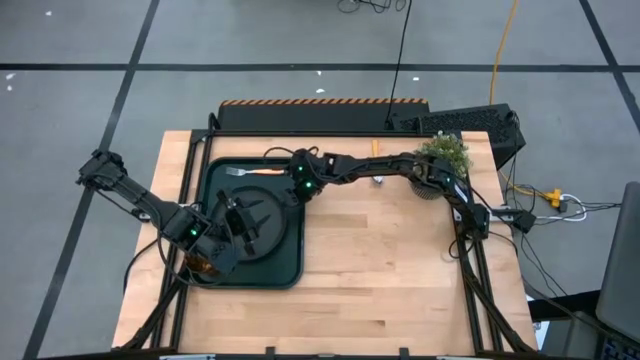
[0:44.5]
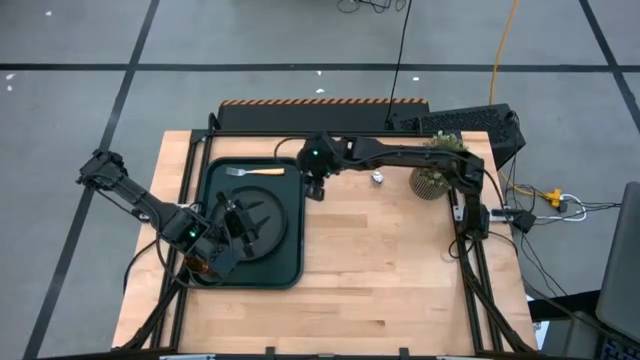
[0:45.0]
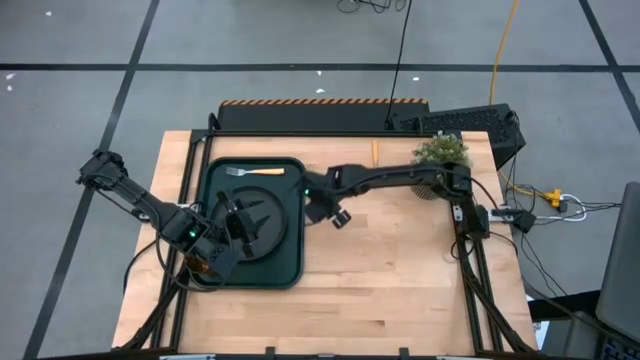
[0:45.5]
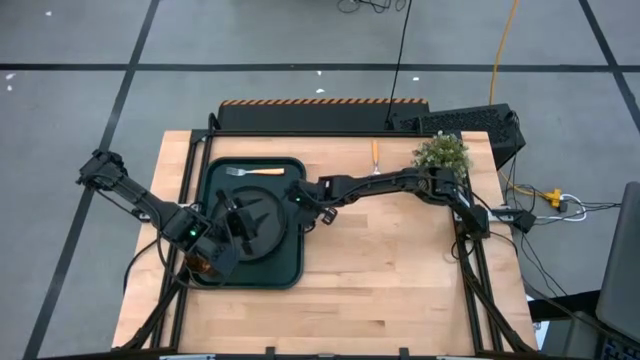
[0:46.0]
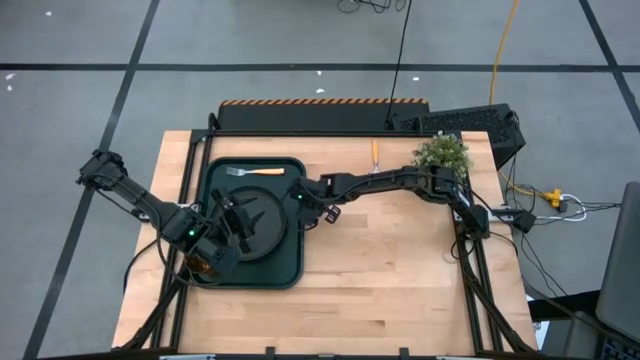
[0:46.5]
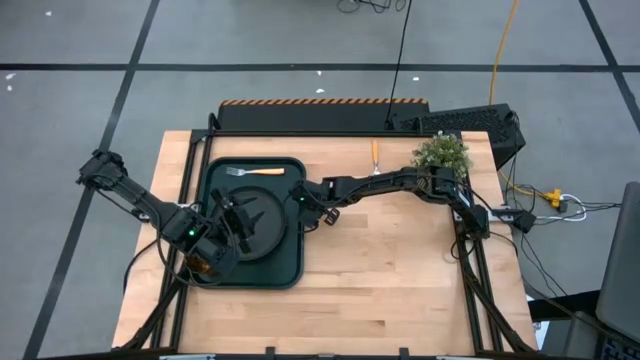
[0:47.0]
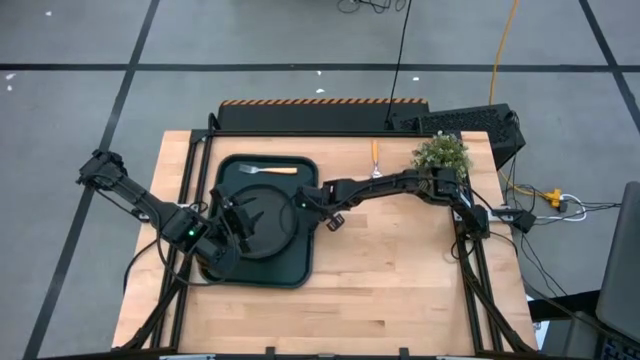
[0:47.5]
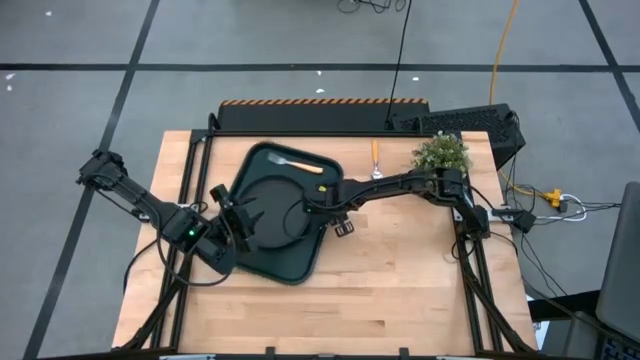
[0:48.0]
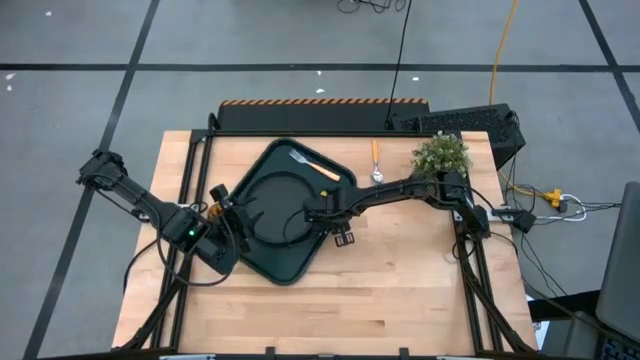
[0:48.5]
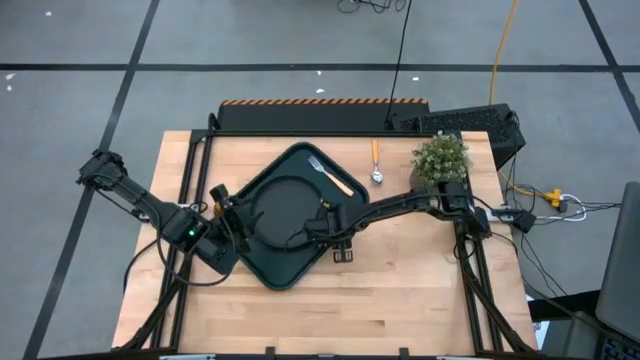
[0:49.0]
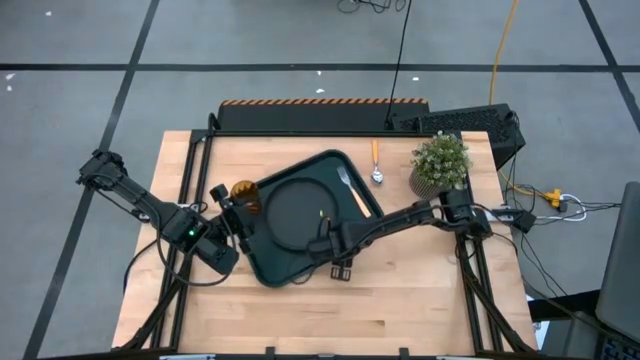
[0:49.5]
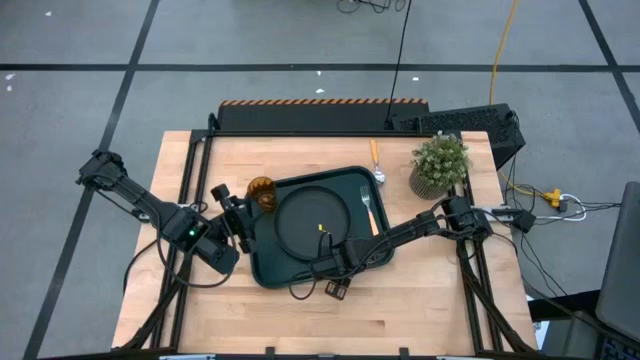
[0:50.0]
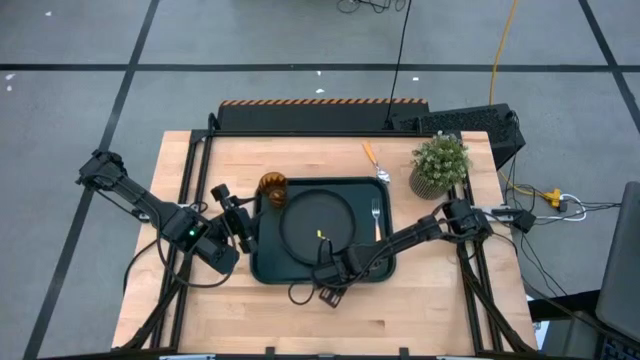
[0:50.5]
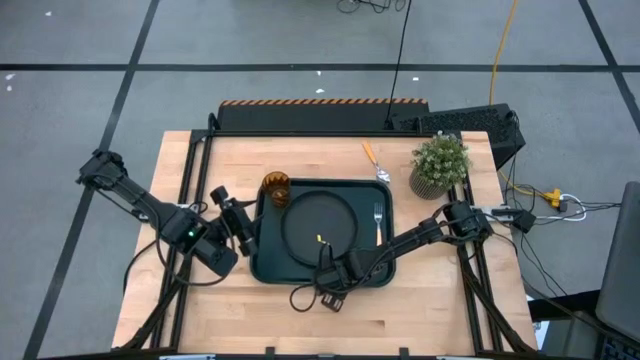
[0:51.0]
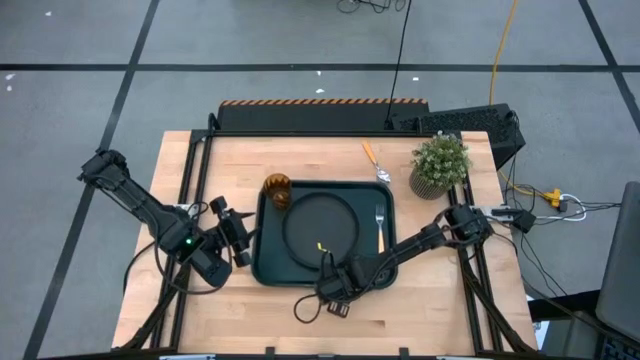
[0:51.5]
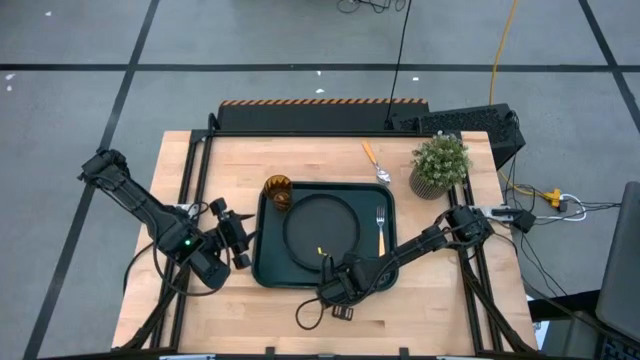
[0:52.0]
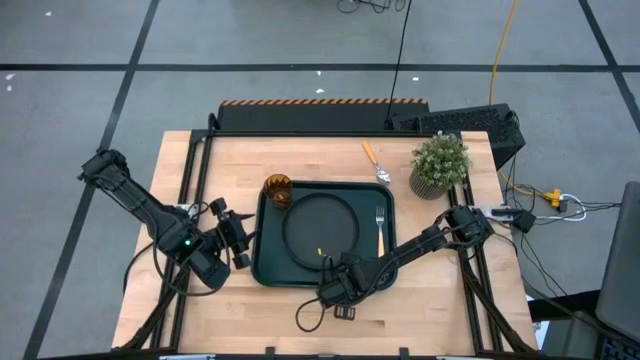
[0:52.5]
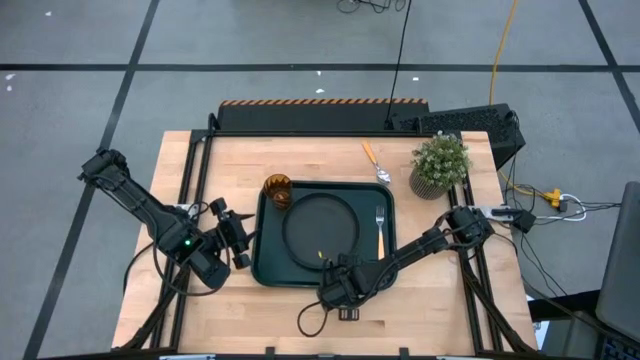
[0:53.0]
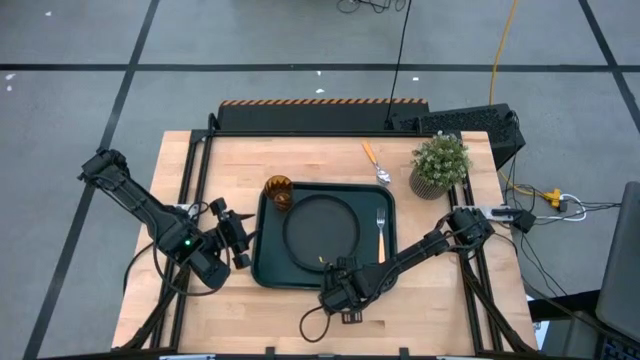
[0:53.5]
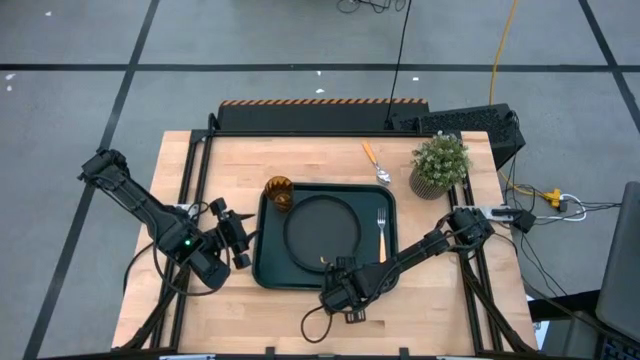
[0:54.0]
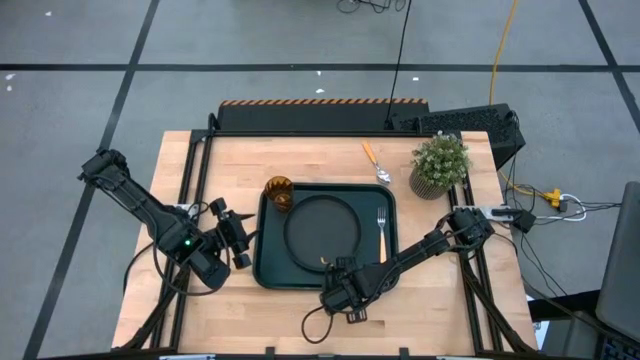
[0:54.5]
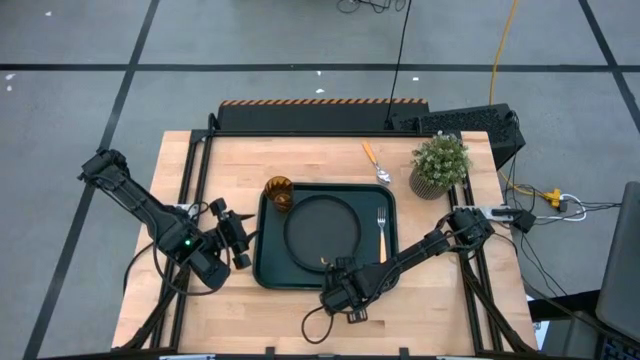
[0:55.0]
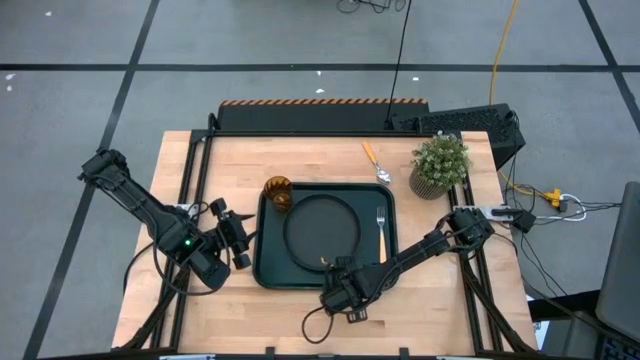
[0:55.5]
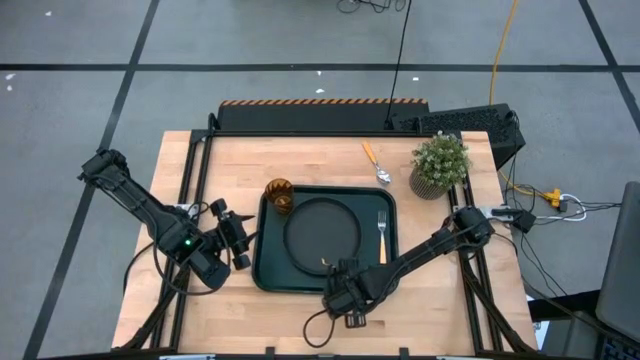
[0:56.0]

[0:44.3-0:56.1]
Task: Pick and place plate/cup/fork/spoon on tray
Move the black tray to the center of the table

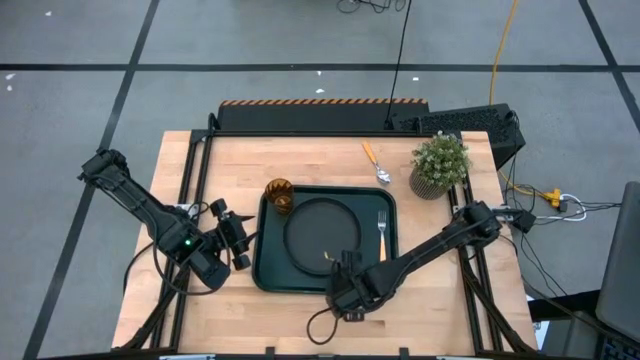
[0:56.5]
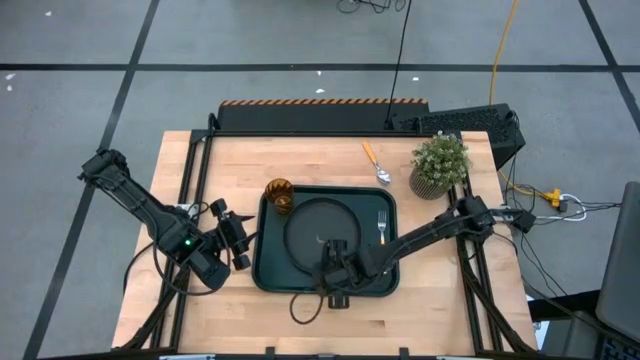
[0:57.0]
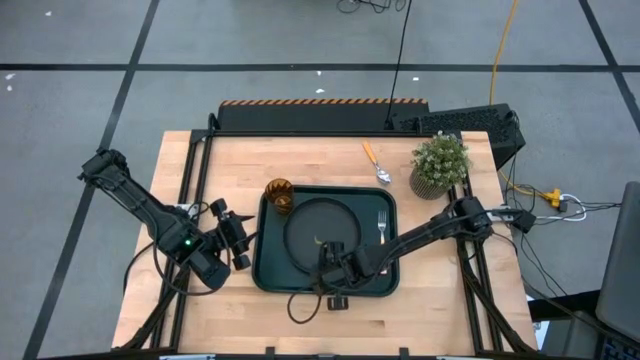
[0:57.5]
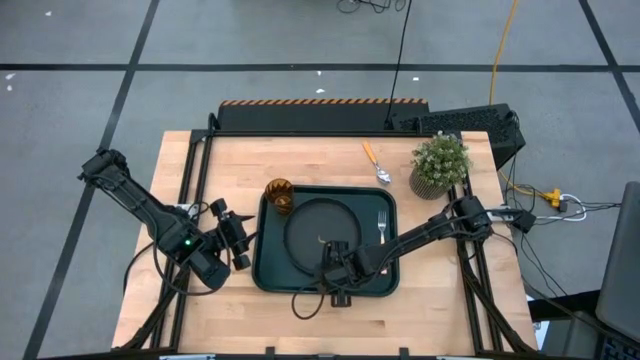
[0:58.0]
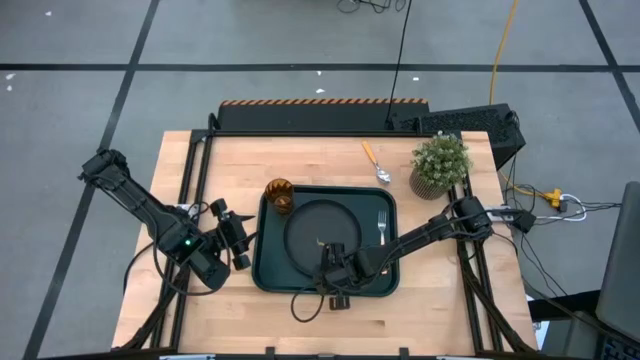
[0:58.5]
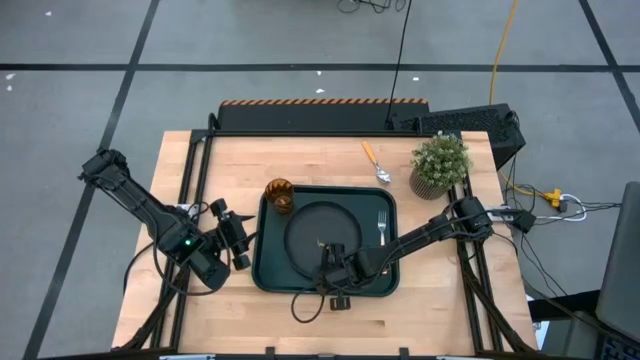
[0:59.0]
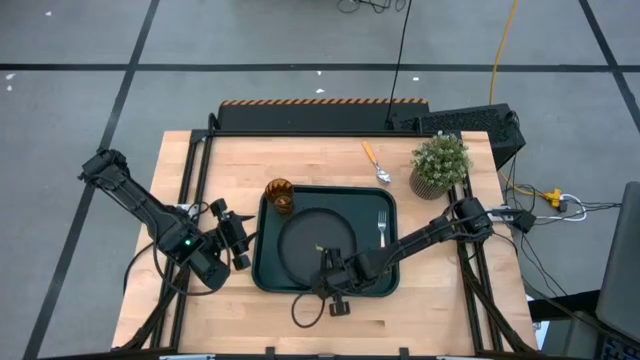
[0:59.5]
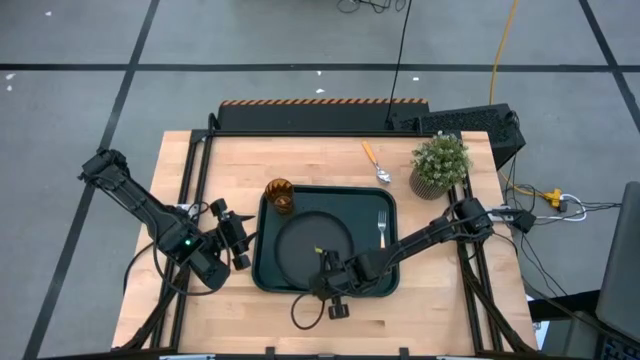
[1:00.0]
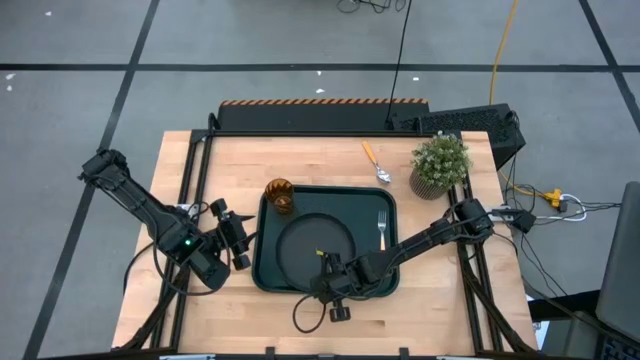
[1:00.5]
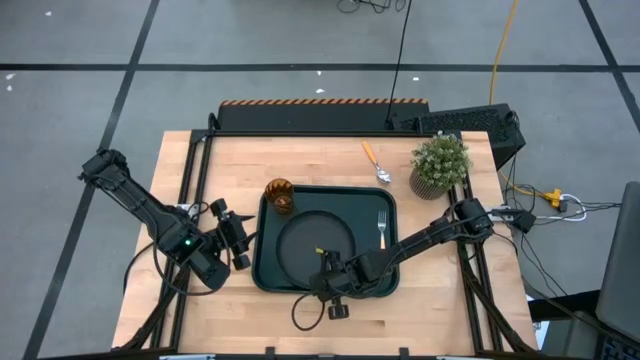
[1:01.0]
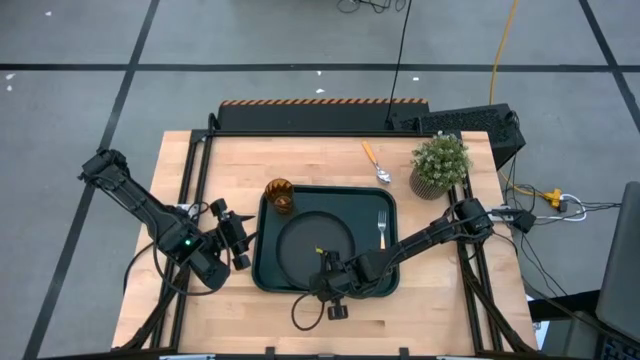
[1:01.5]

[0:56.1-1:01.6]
Adjust the black plate on the black tray

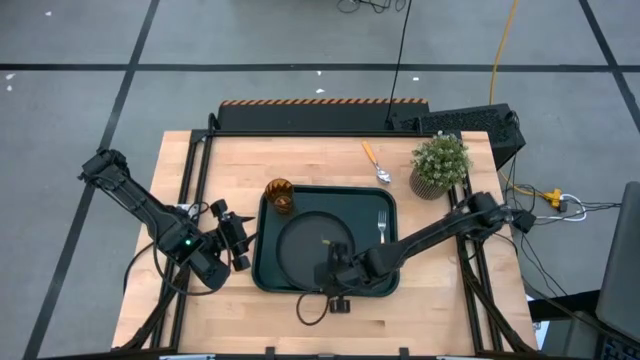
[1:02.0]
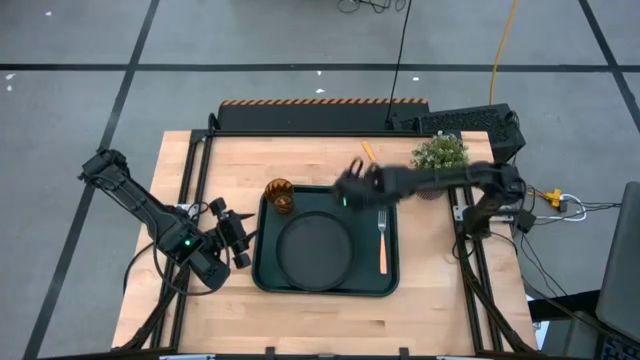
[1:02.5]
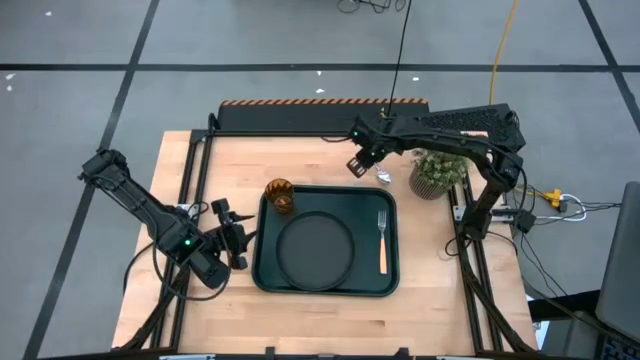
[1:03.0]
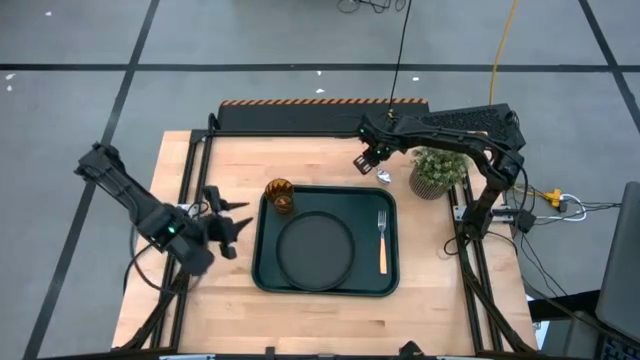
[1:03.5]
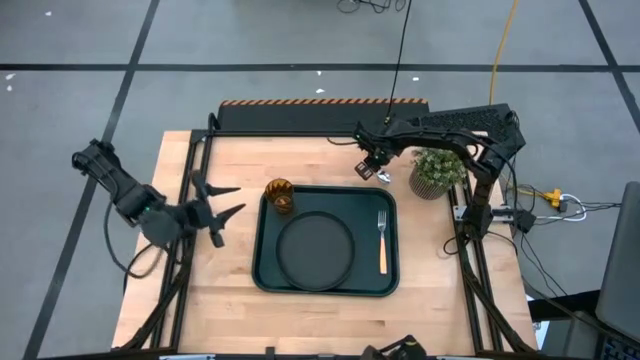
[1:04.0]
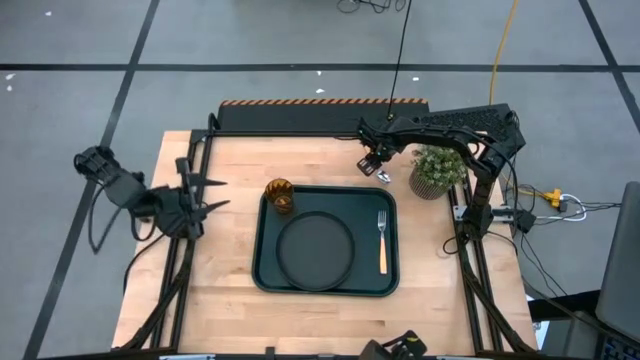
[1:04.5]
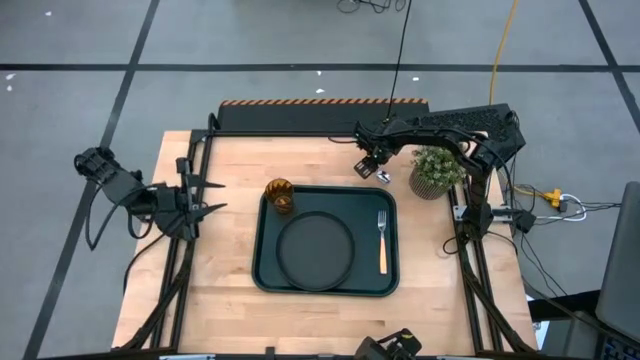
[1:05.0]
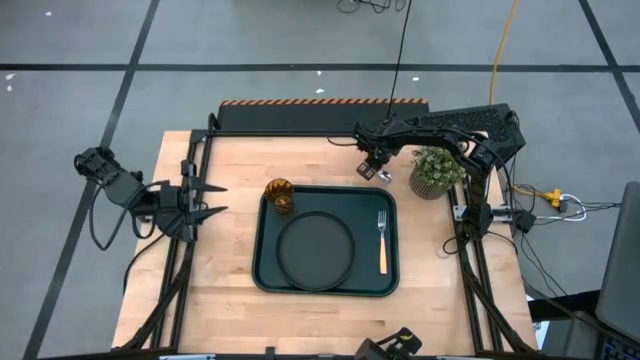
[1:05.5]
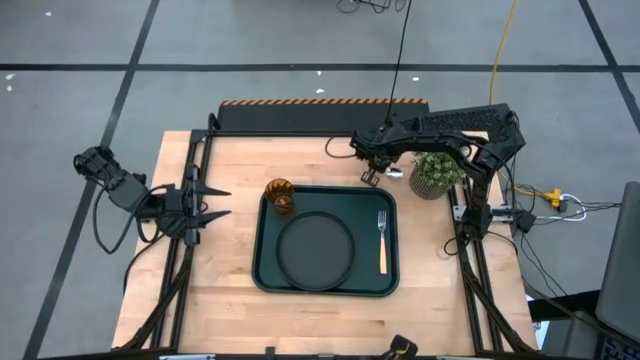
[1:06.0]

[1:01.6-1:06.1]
Put the orange spoon on the black tray
